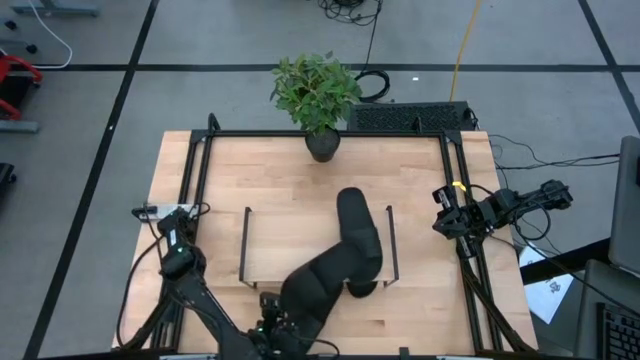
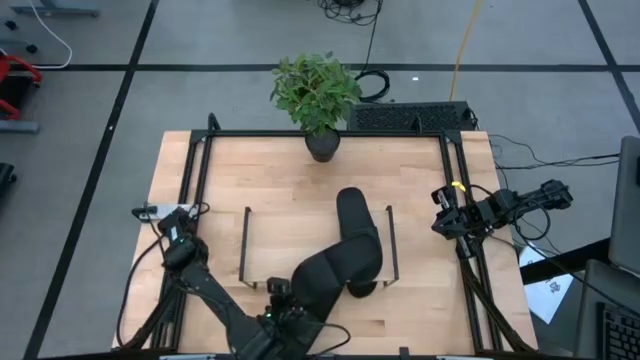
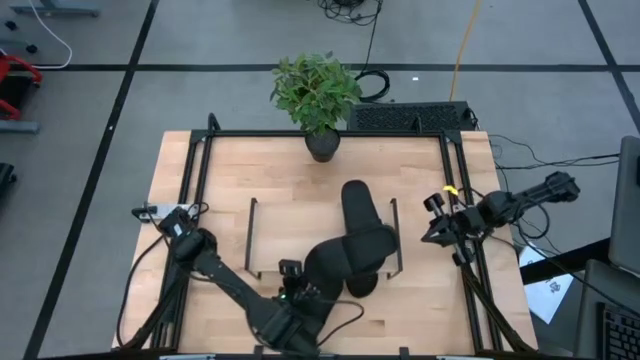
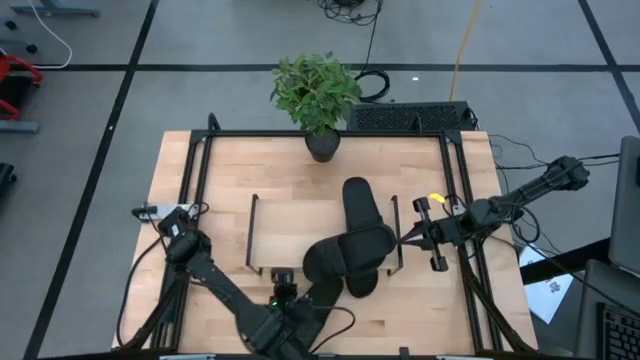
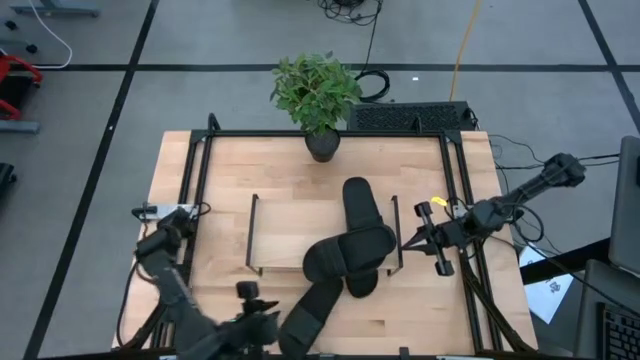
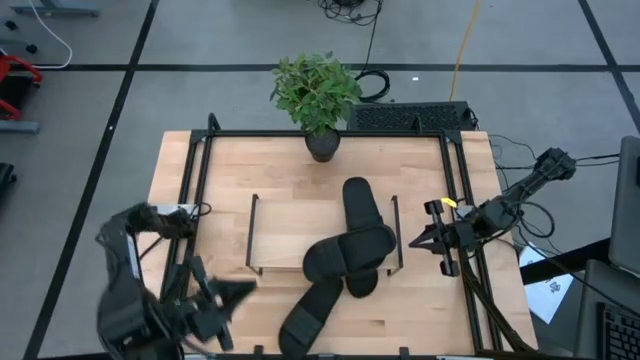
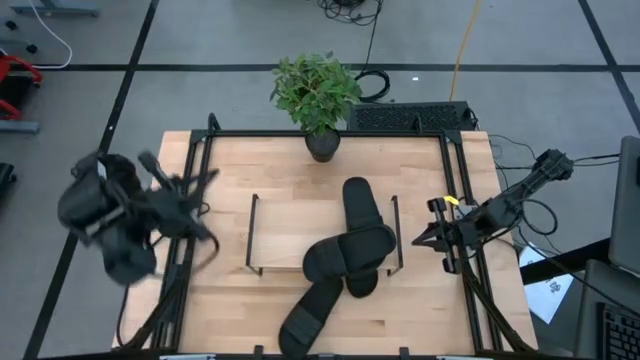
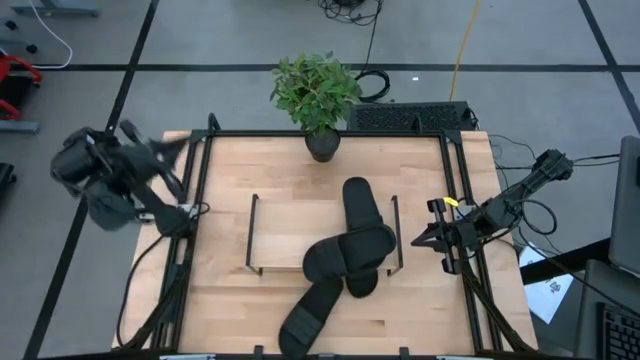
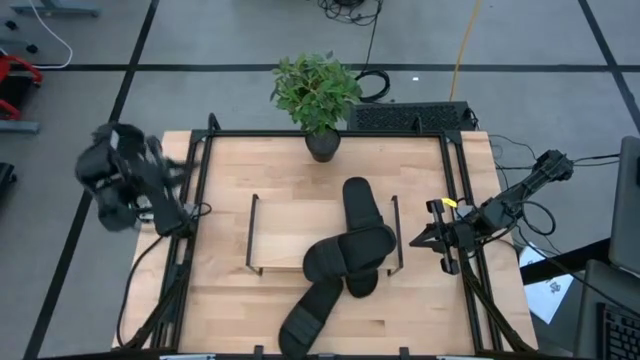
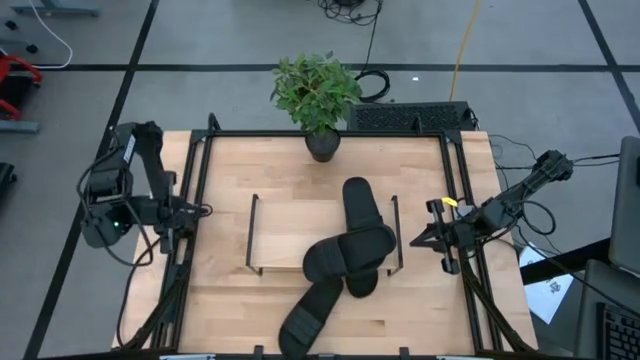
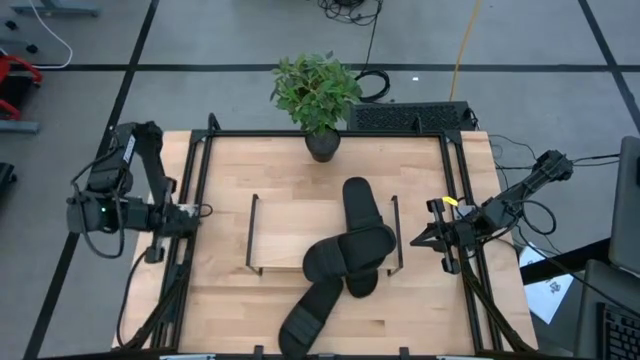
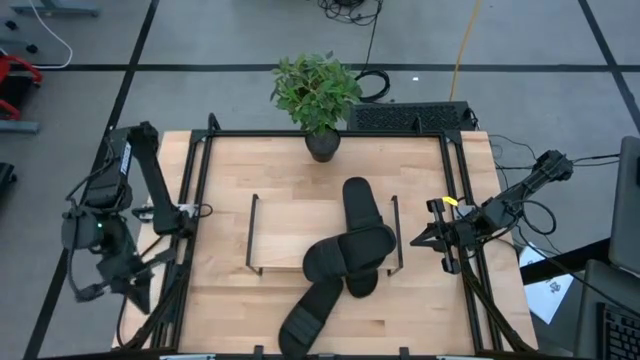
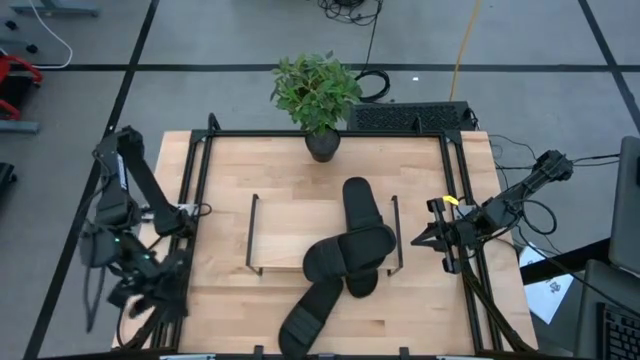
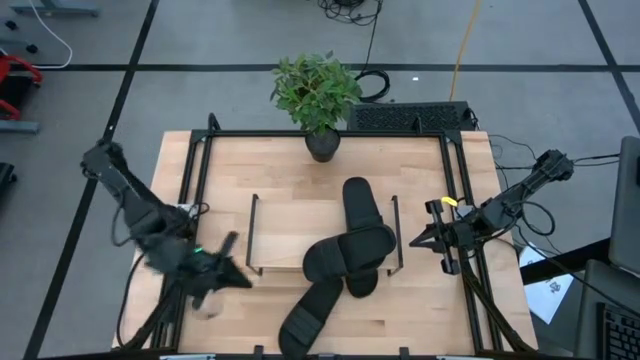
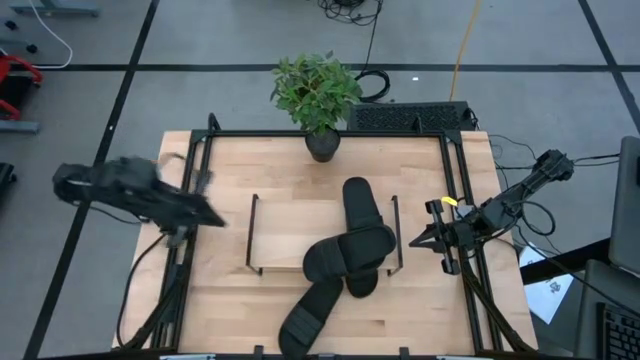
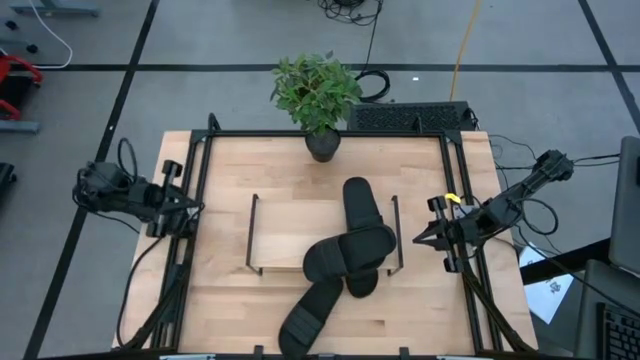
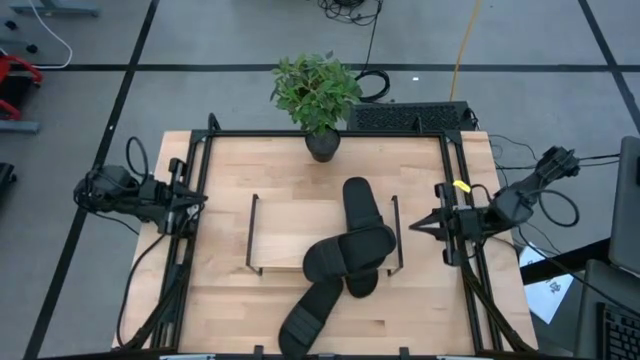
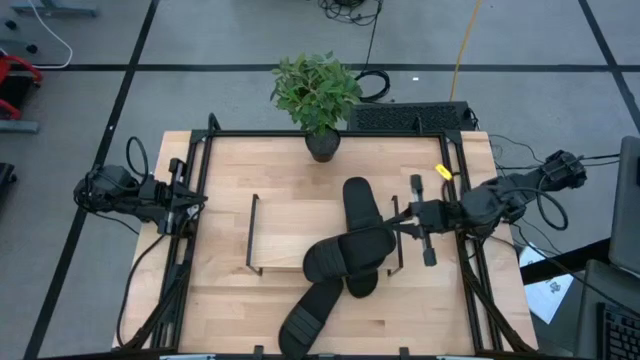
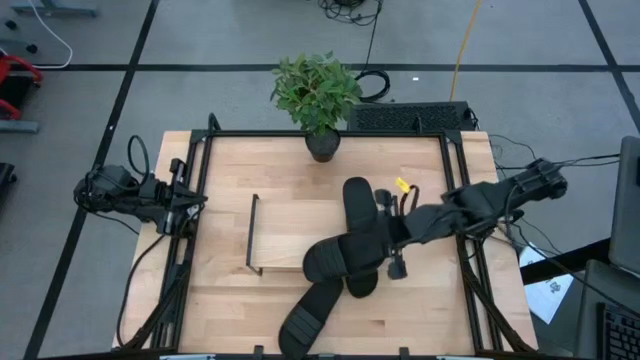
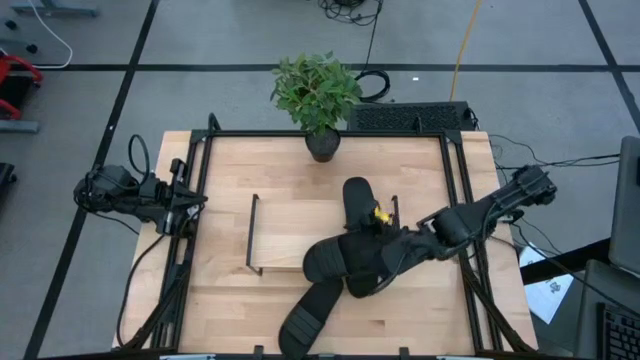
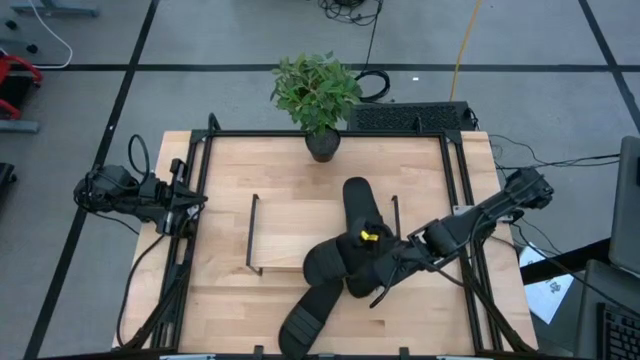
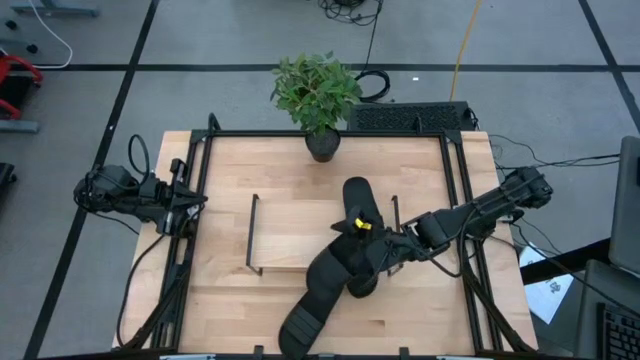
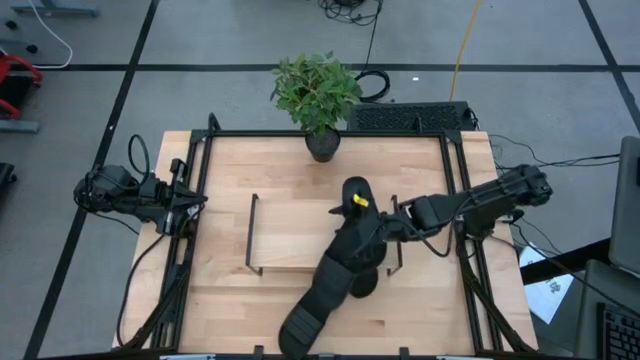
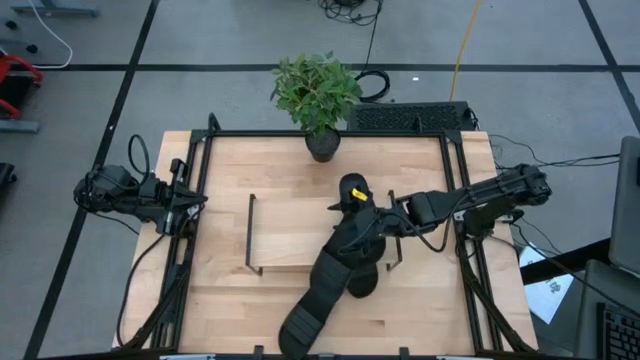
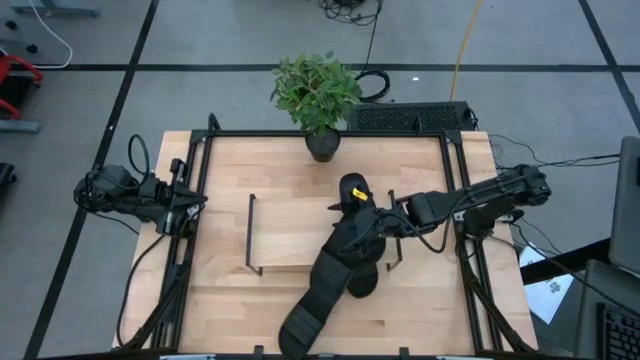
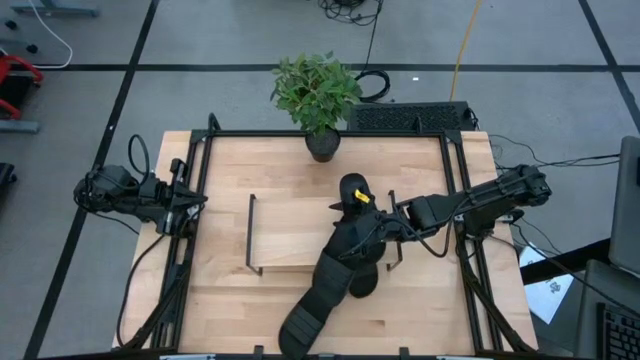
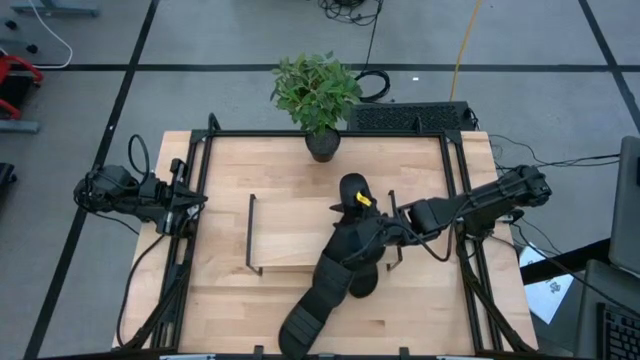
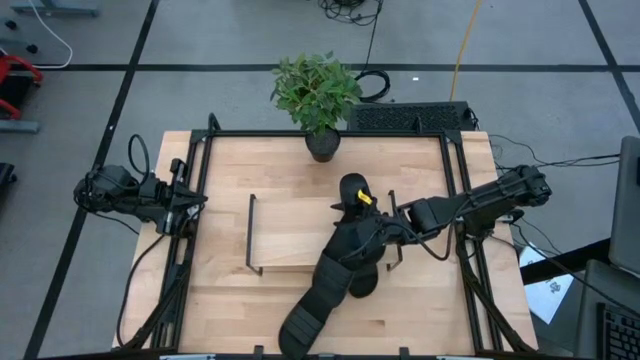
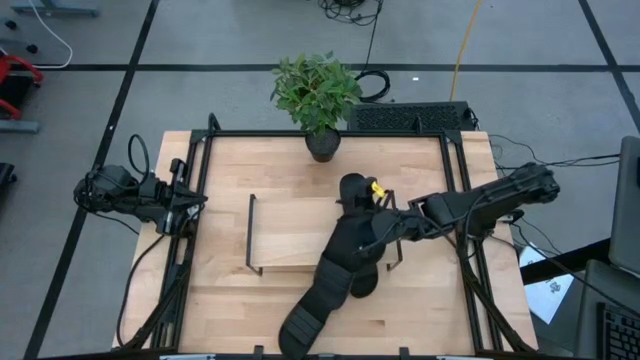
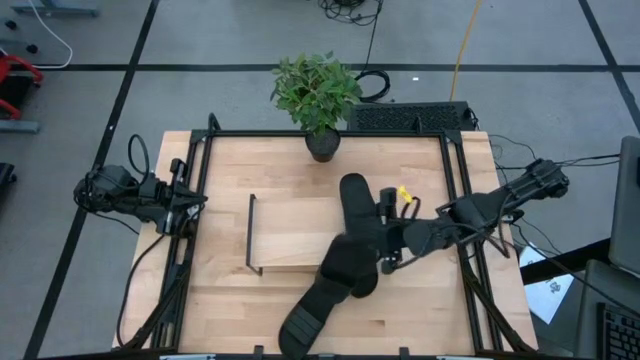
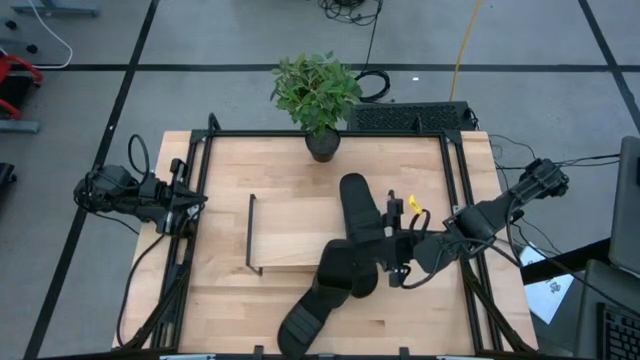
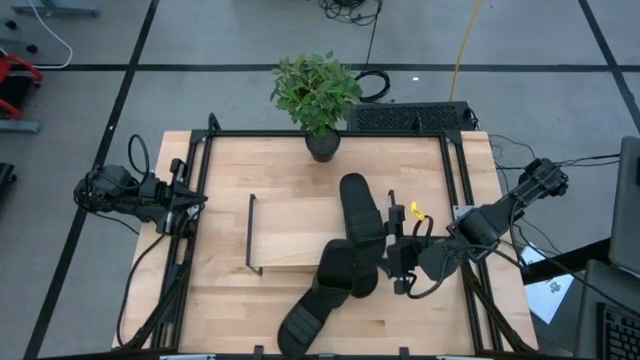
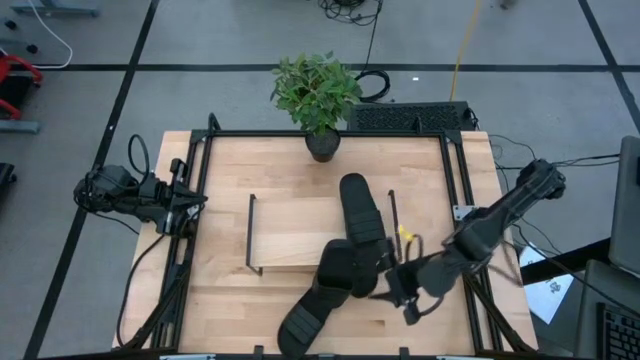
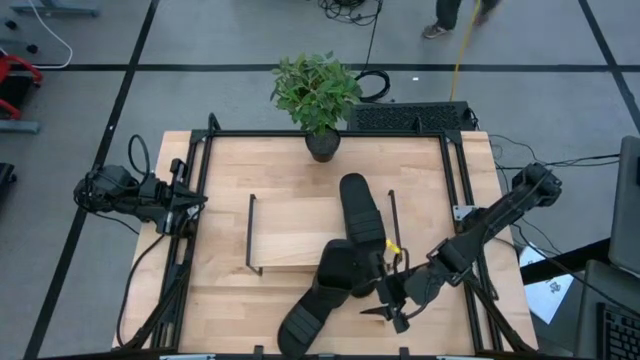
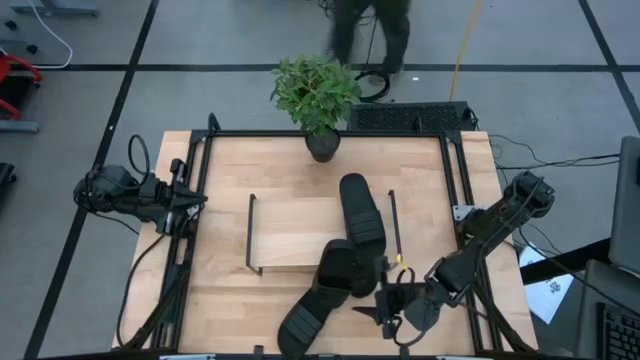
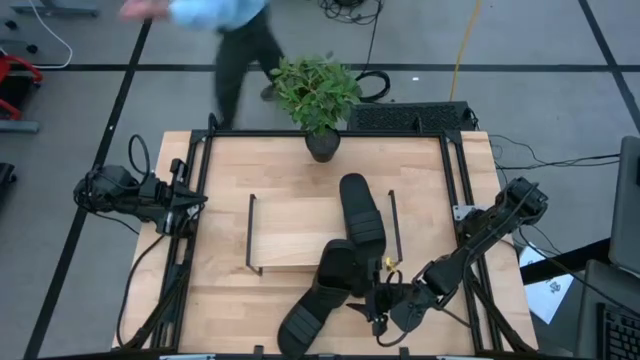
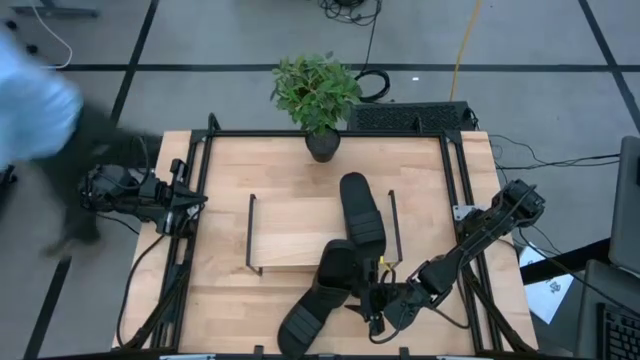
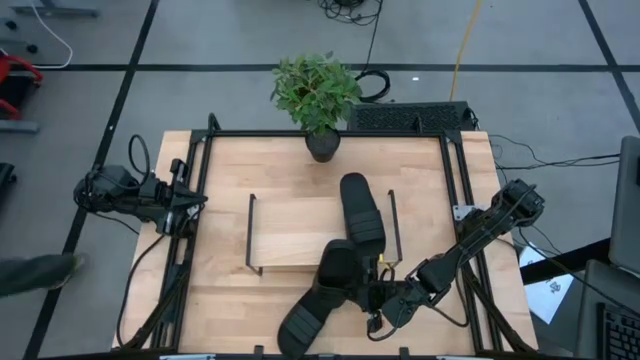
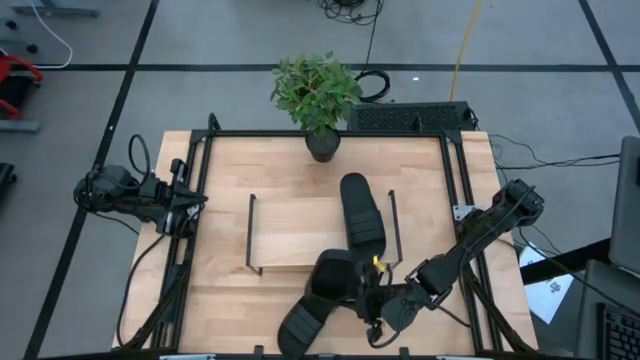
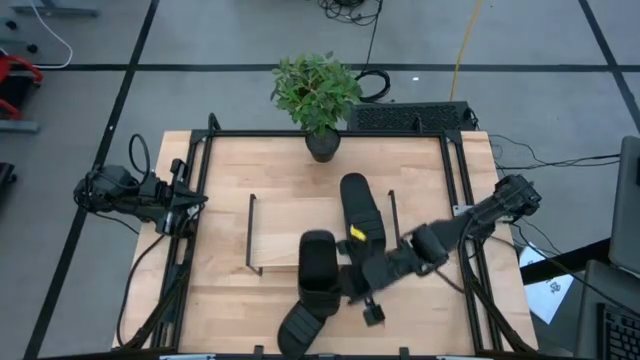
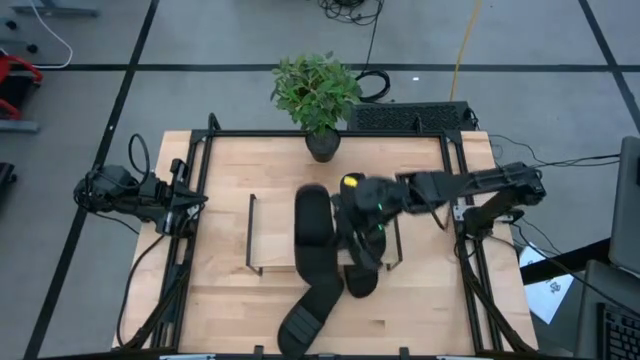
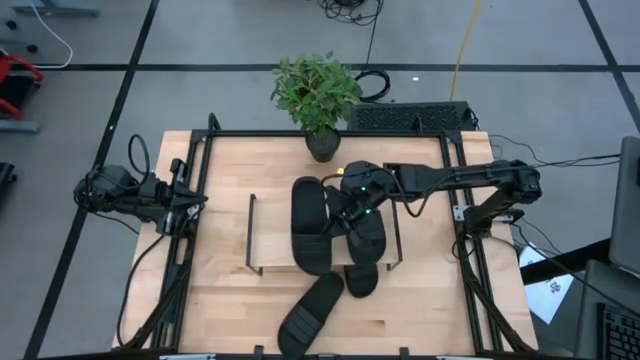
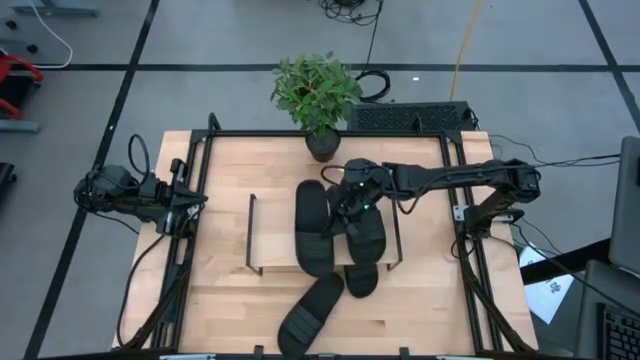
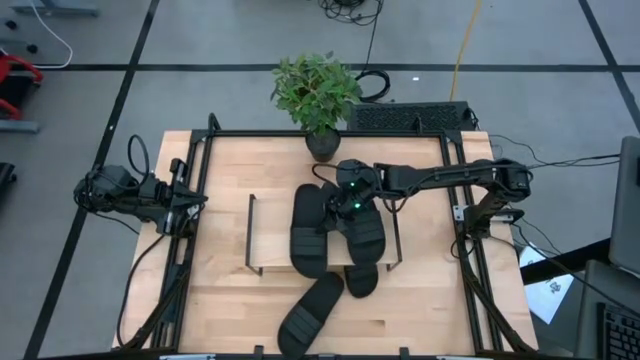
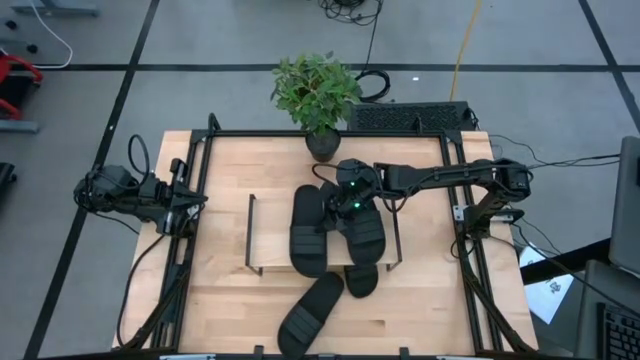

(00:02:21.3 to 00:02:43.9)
Task: Pick and place slides into the shelf
Adjust the black slipper on the shelf

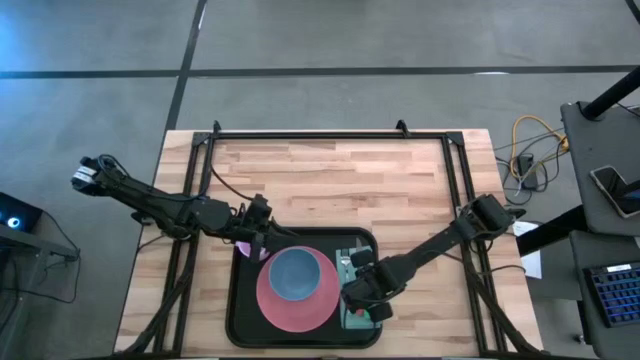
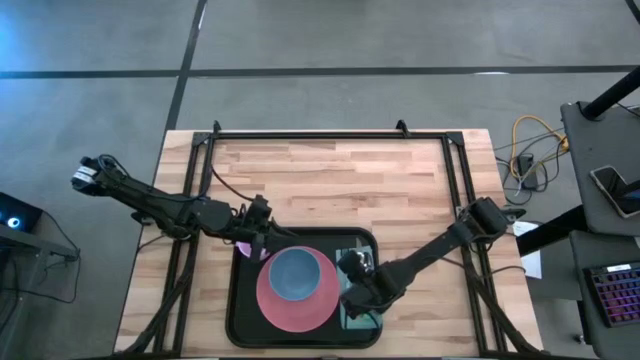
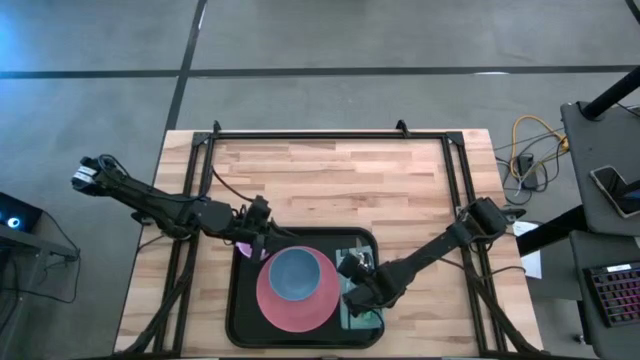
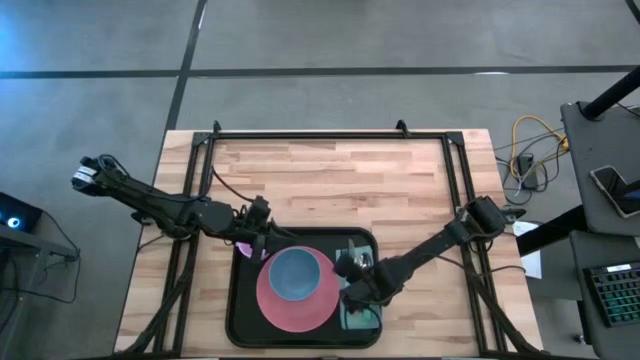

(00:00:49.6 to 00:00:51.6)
Task: Set up tray
Adjust the orange knife
